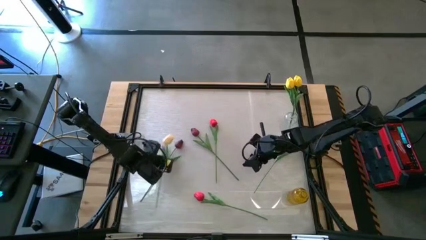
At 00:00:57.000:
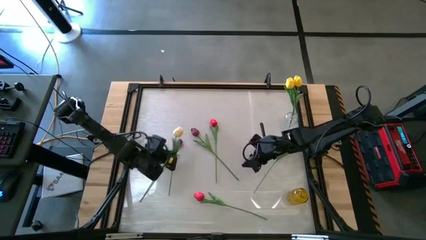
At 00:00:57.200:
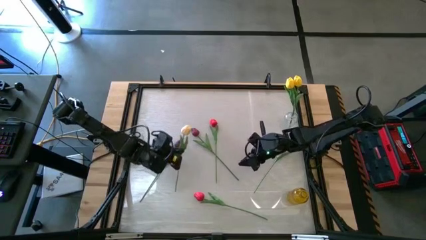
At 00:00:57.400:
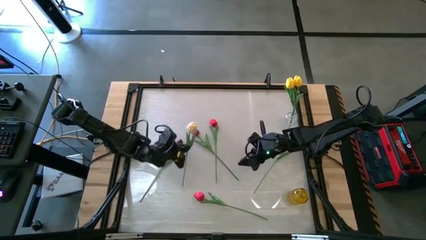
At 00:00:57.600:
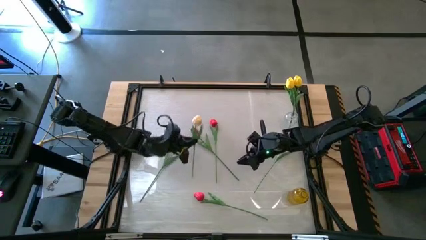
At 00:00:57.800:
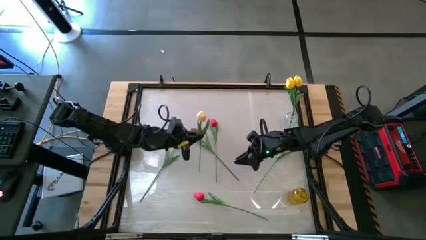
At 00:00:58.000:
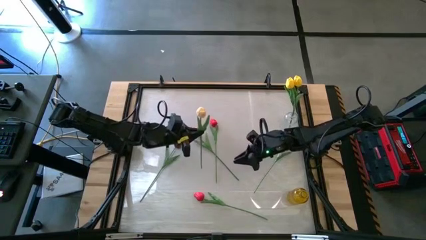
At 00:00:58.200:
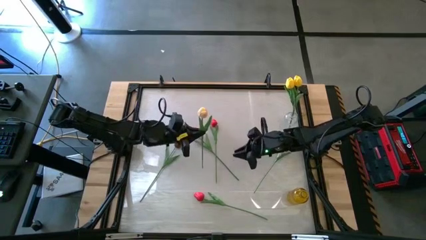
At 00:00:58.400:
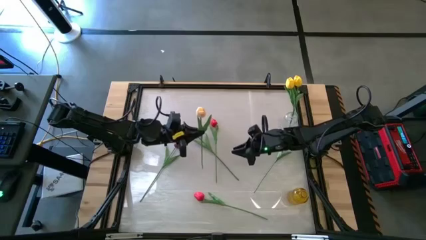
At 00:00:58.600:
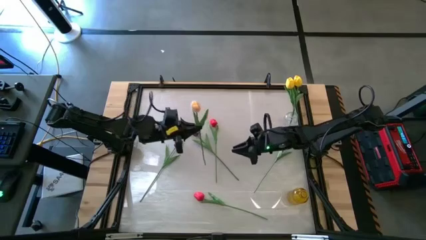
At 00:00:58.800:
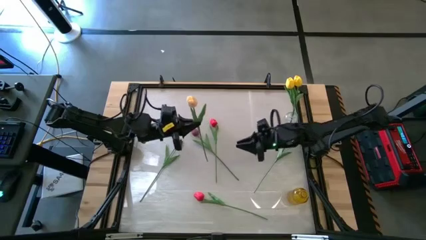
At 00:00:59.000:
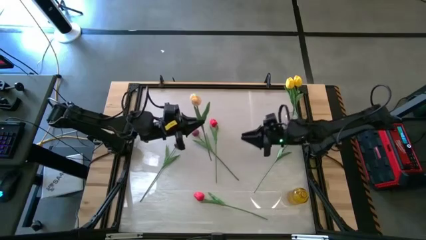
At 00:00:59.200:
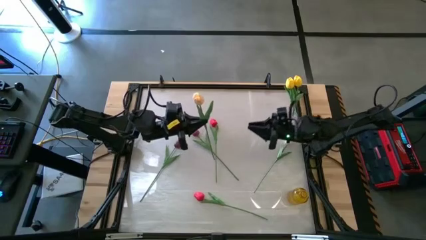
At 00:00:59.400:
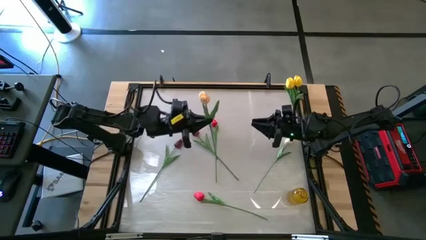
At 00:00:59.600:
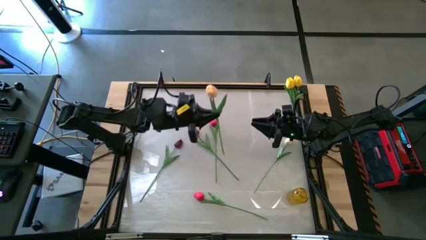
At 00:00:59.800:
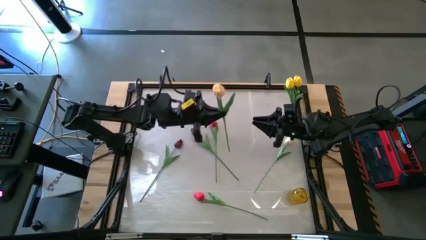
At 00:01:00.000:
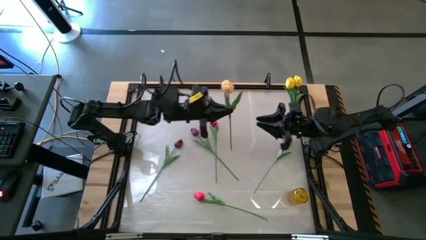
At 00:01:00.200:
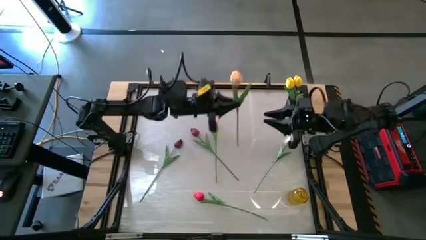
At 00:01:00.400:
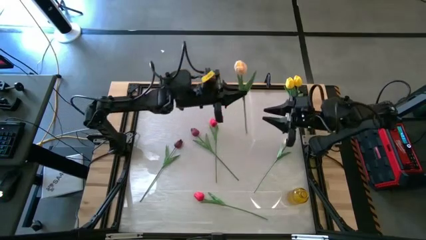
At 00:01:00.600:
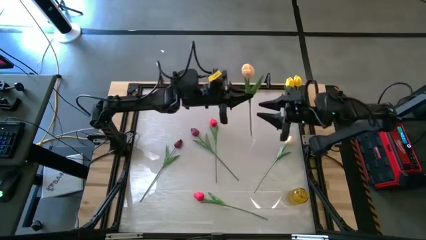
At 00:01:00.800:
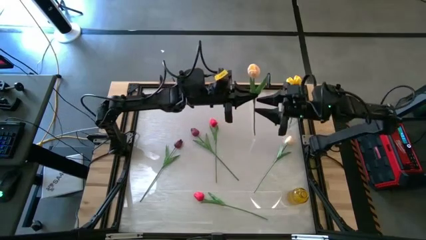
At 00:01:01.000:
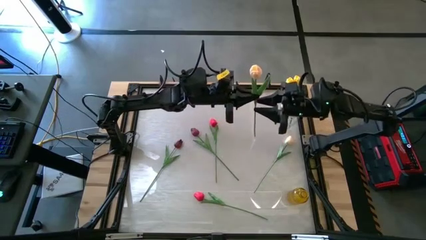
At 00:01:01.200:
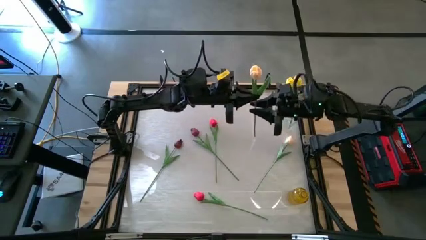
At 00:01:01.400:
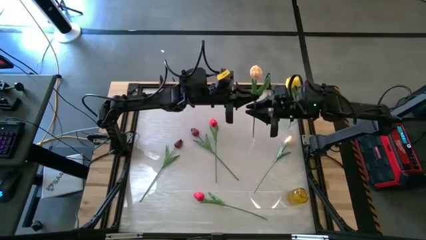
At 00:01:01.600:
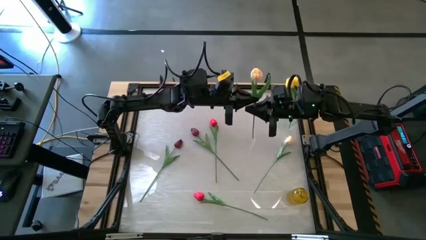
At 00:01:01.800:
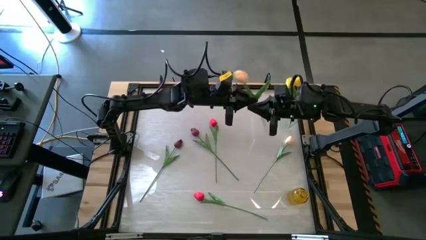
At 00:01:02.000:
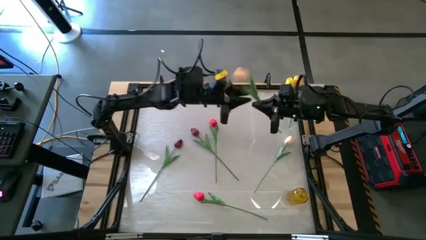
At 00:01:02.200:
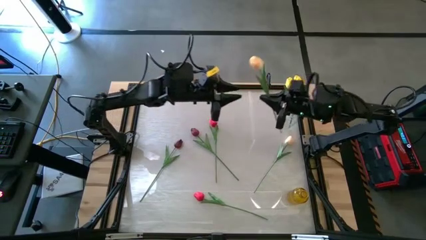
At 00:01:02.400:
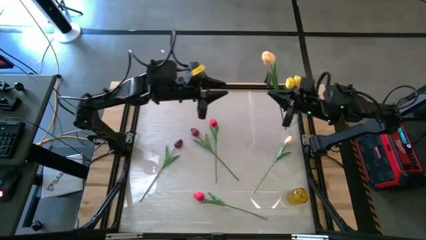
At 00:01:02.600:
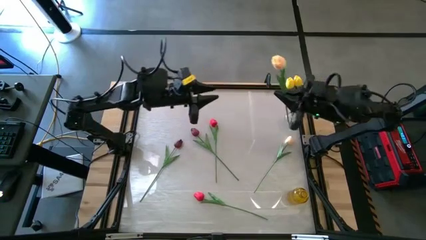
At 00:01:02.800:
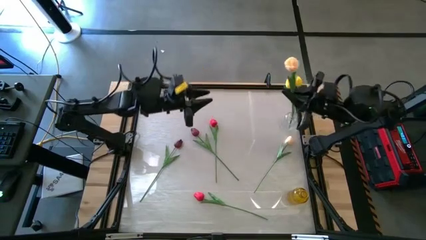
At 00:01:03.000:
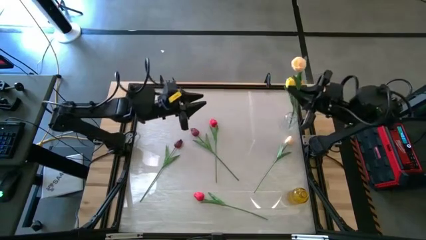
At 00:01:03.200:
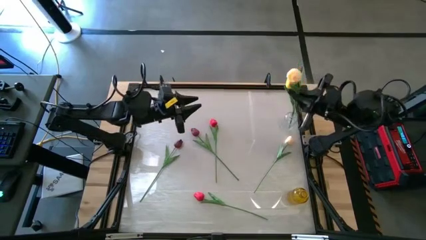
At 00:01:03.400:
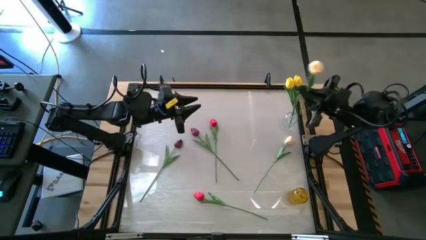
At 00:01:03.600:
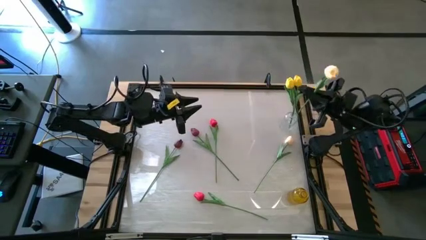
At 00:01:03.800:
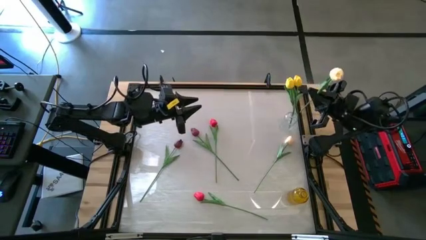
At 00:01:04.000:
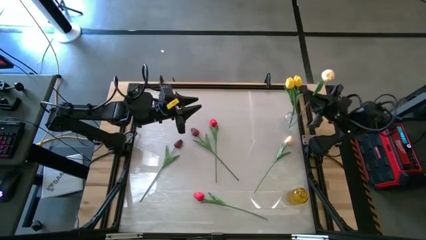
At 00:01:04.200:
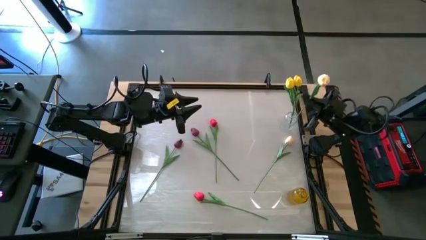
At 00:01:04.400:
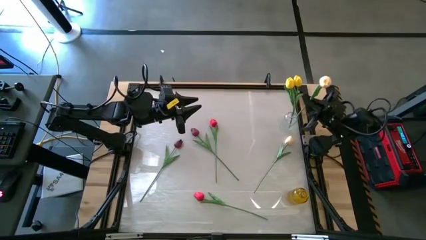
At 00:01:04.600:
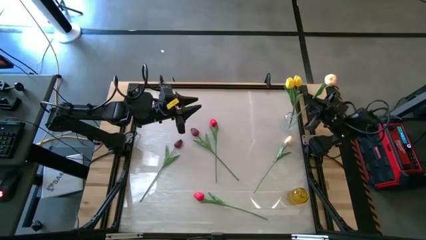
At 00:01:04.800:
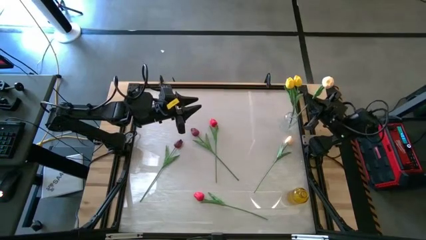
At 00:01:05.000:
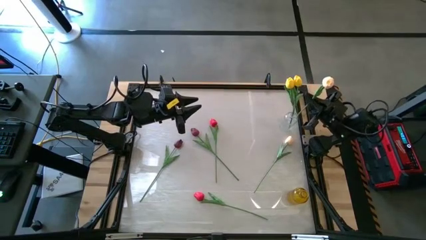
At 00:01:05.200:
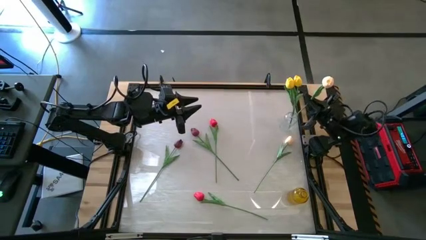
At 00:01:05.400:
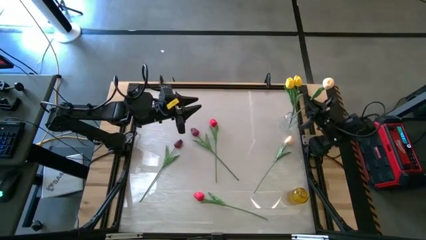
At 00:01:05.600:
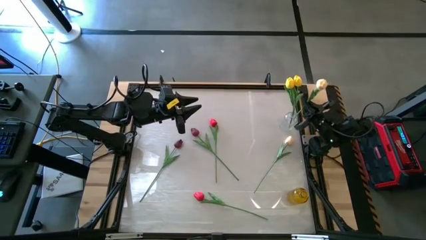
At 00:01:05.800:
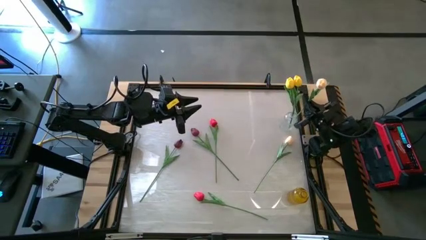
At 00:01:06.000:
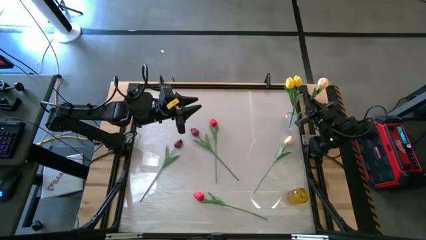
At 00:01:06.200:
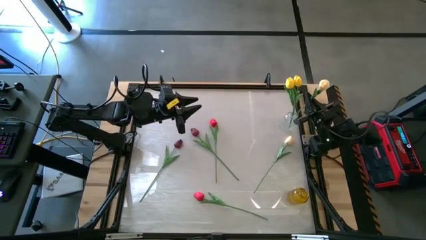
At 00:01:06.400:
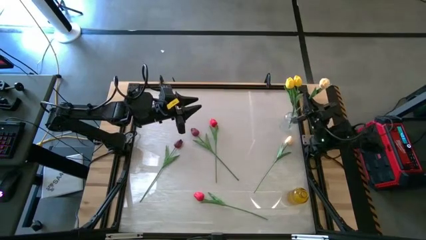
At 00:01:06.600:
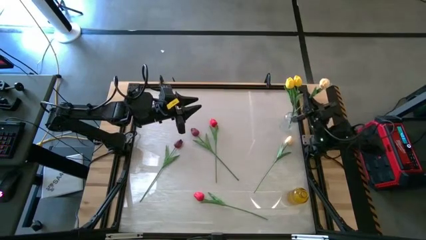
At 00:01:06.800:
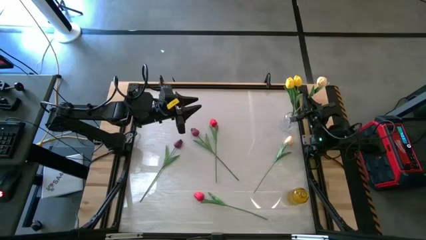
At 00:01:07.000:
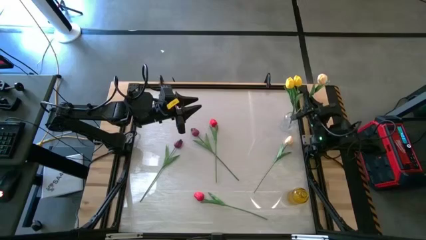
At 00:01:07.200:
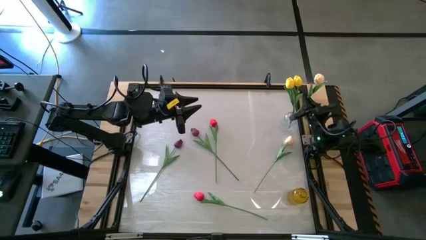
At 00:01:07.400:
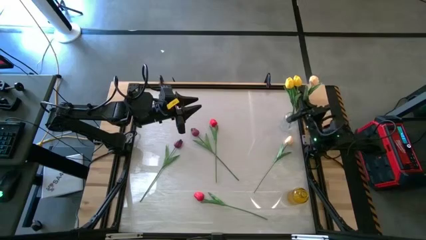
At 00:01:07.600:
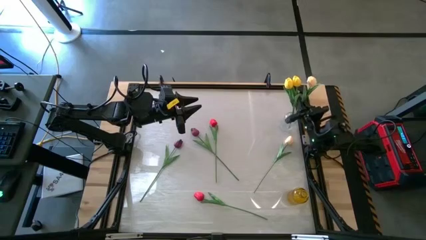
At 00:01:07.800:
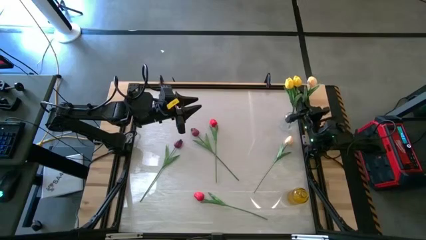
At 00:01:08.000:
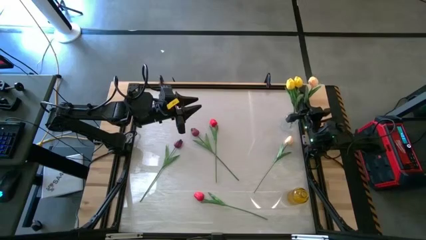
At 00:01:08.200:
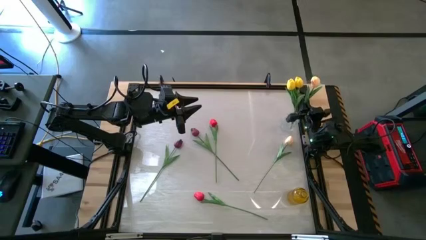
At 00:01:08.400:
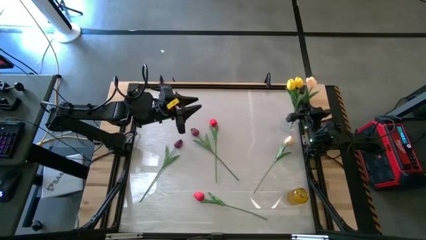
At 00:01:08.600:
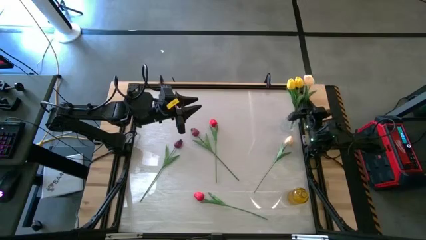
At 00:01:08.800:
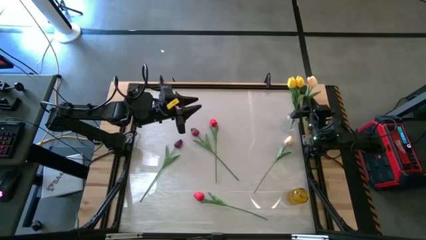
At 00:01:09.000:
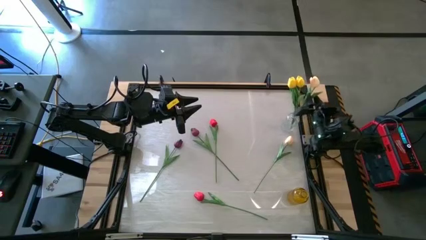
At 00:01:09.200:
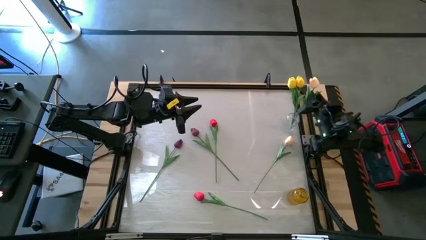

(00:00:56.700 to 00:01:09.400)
Task: Sort flowers into vase by color
Put the left white tulip into the transparent vase
